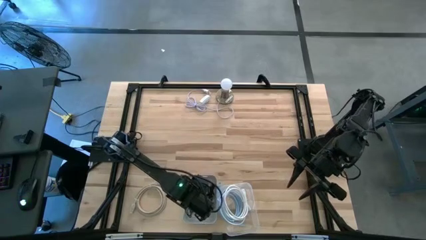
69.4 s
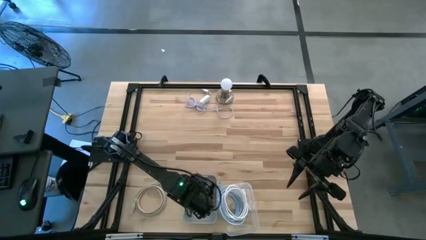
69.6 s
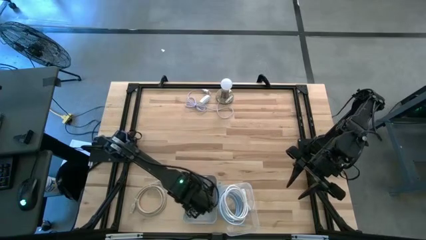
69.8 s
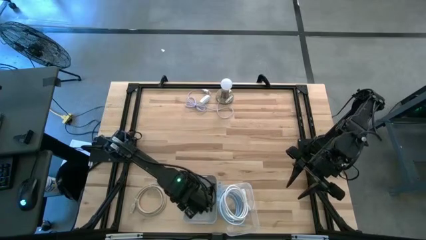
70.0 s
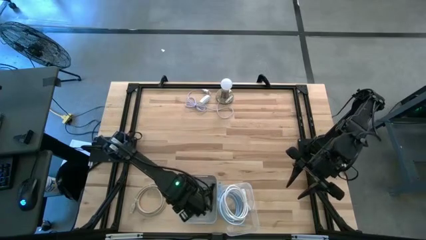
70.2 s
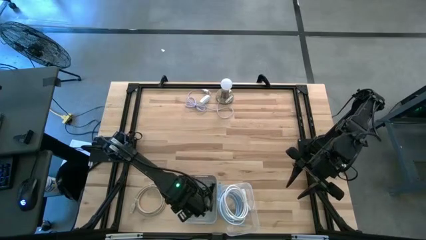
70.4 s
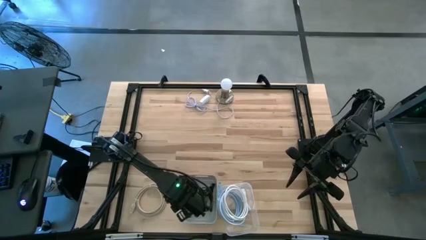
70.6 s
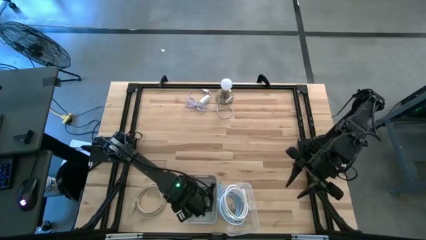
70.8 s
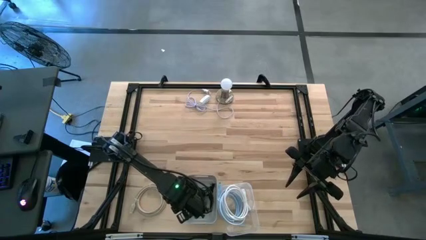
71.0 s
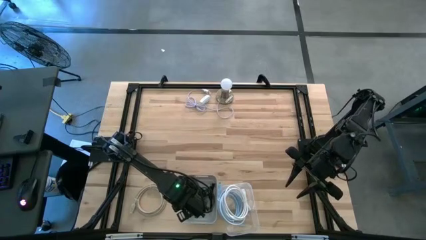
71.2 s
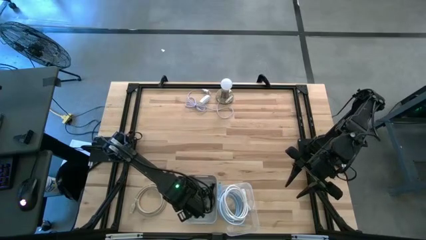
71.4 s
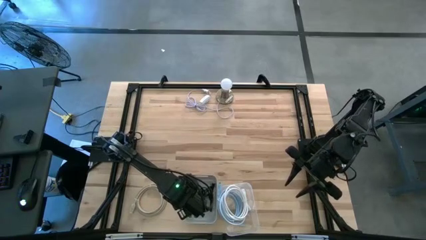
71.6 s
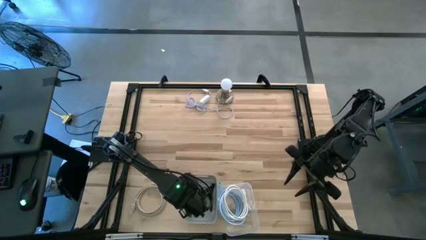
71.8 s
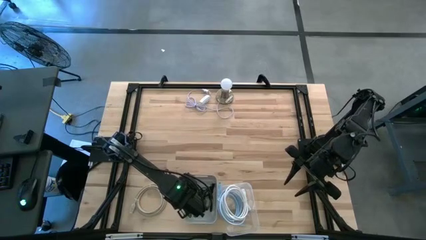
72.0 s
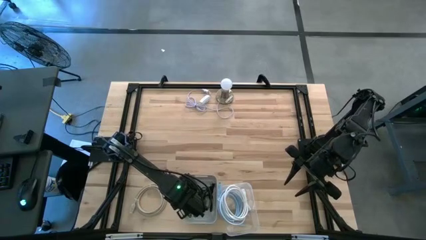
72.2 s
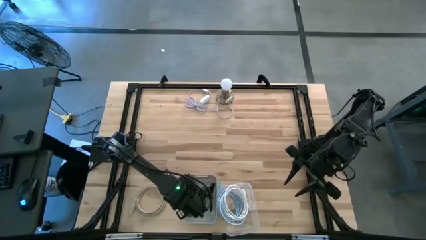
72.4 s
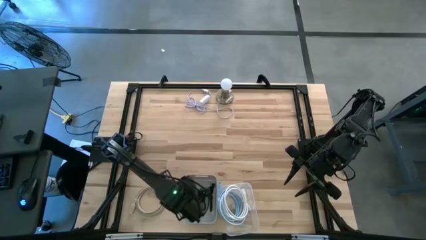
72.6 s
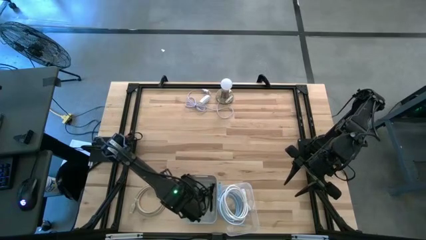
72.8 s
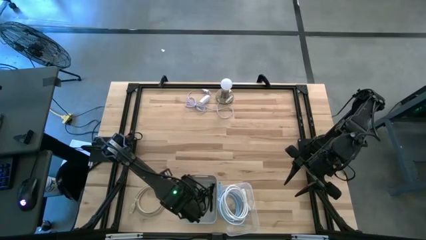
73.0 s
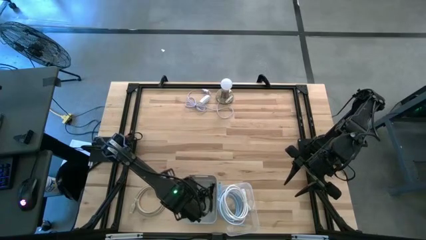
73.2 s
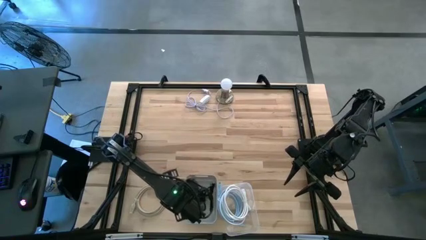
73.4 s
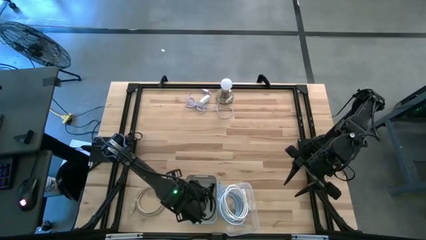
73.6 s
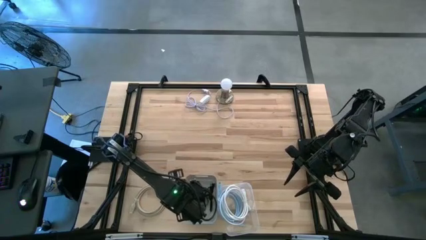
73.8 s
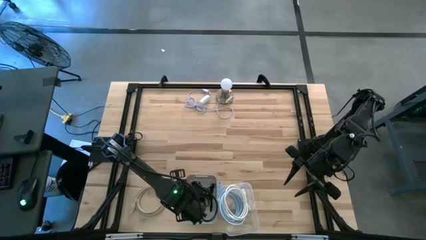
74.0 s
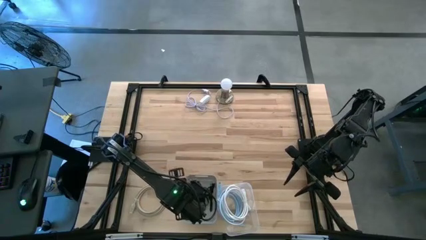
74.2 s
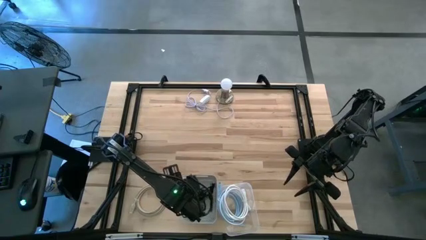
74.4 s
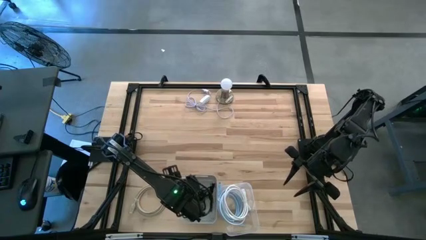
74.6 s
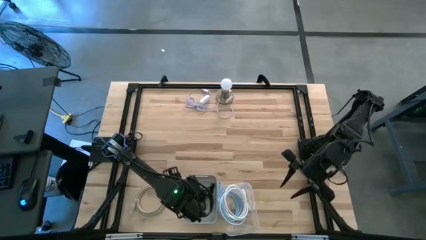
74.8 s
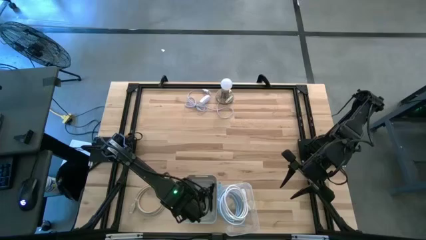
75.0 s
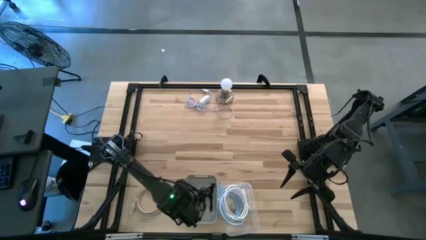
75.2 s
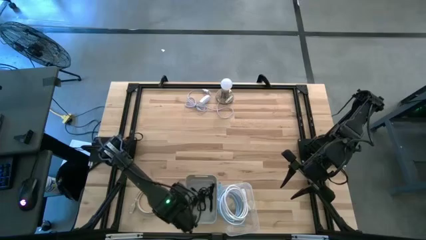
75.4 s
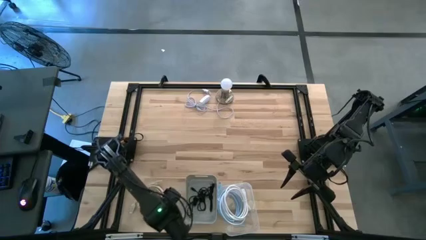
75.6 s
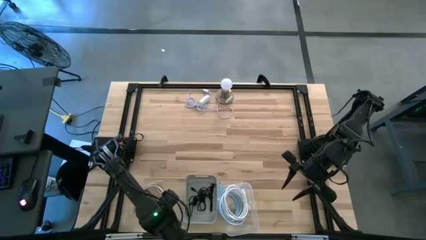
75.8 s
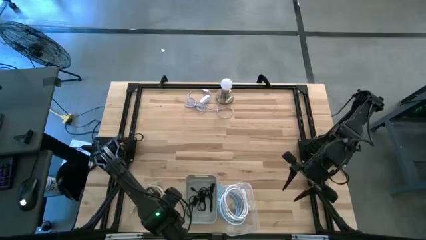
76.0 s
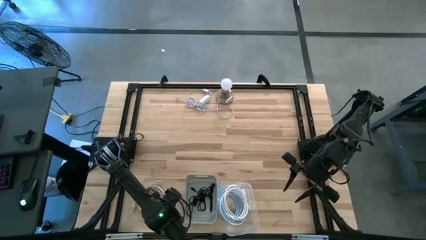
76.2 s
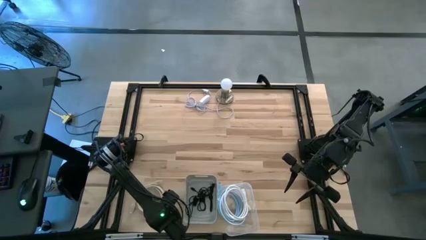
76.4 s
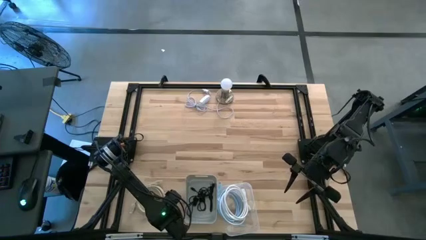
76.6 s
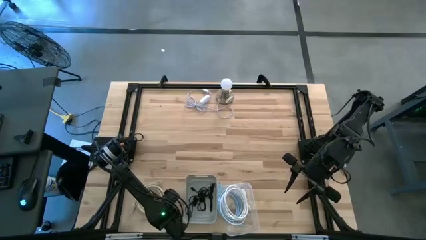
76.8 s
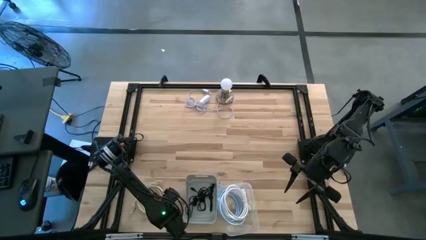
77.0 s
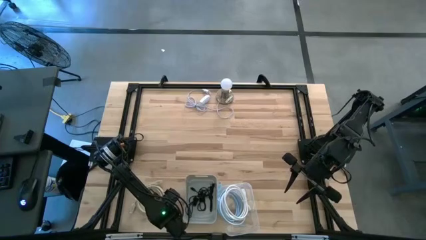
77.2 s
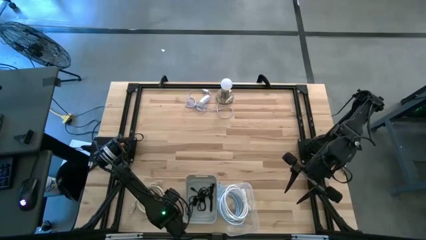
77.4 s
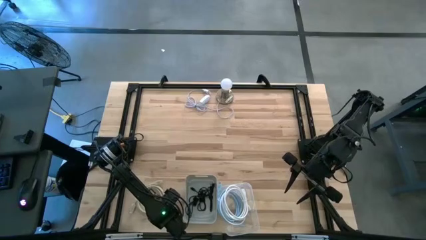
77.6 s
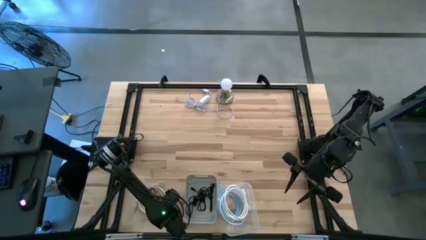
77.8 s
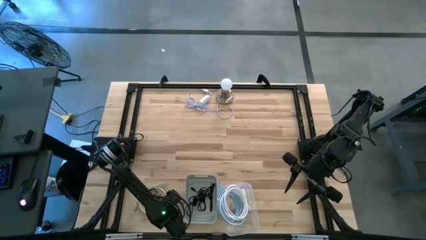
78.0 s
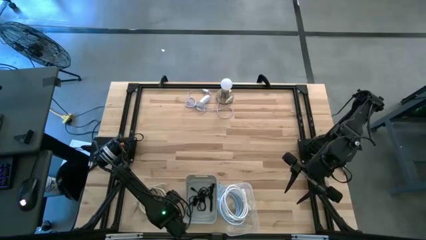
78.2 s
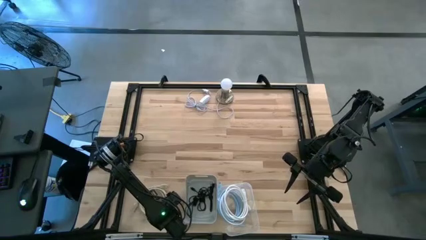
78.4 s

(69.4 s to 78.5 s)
Task: Pick & Place USB Port
Put the gray HDMI cable into the transparent bin

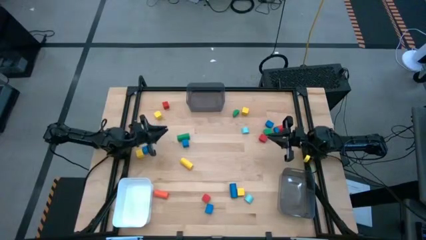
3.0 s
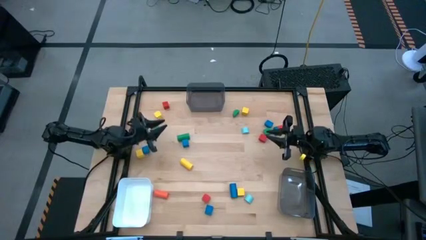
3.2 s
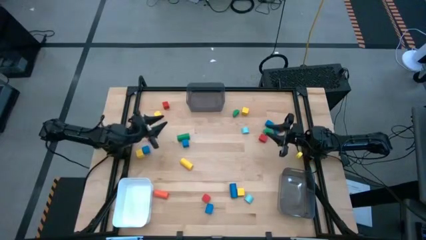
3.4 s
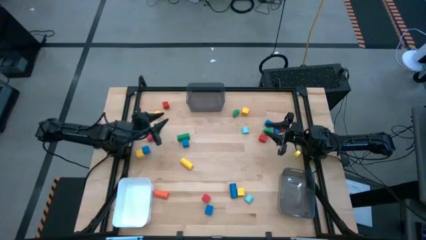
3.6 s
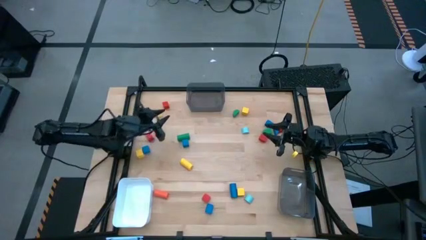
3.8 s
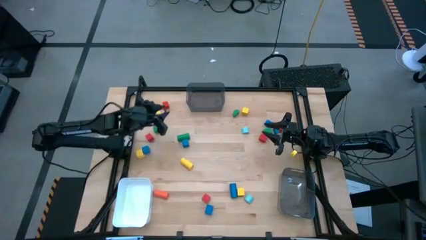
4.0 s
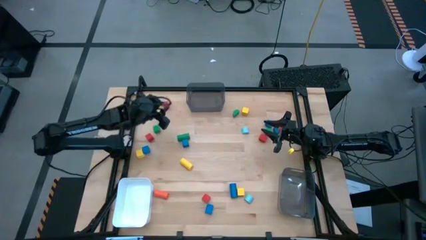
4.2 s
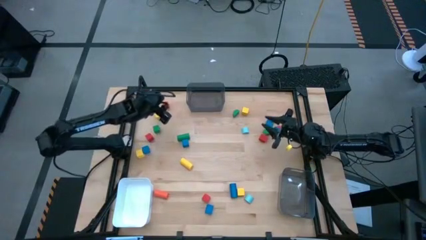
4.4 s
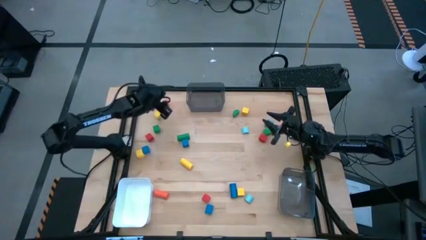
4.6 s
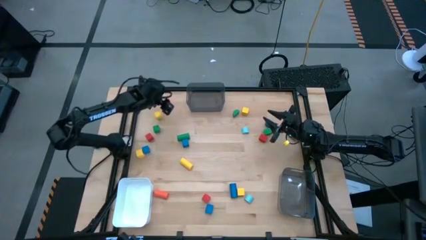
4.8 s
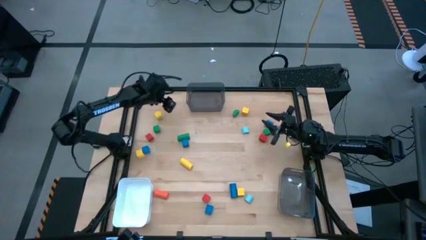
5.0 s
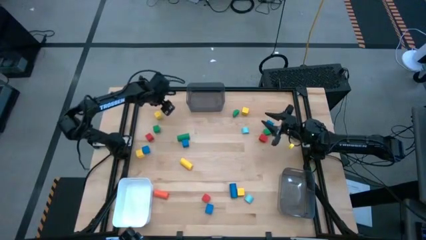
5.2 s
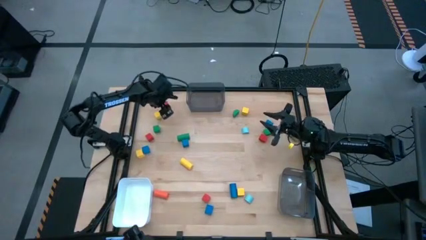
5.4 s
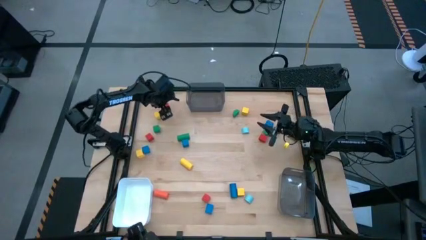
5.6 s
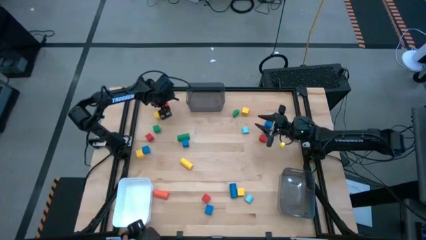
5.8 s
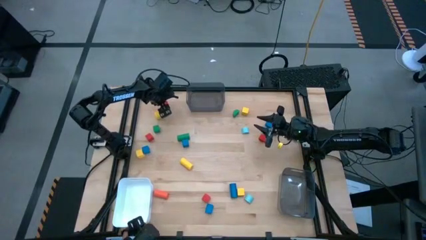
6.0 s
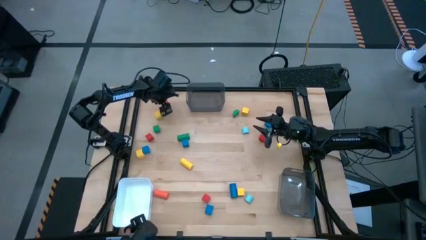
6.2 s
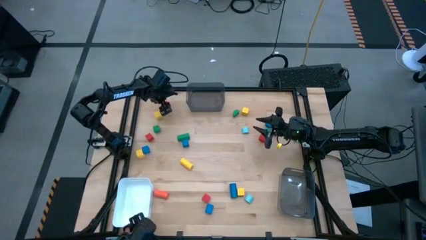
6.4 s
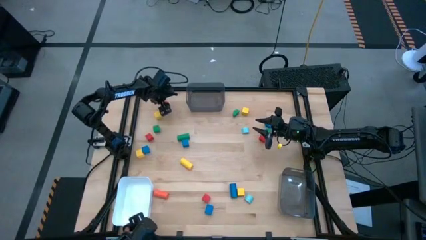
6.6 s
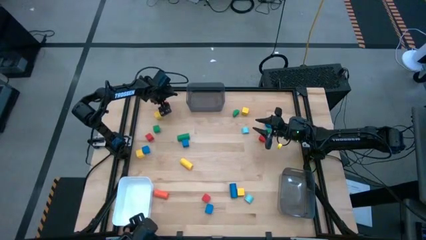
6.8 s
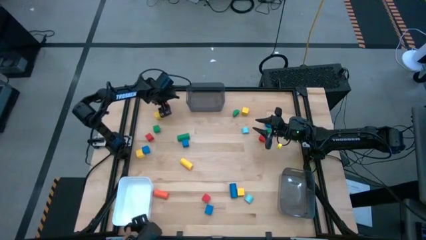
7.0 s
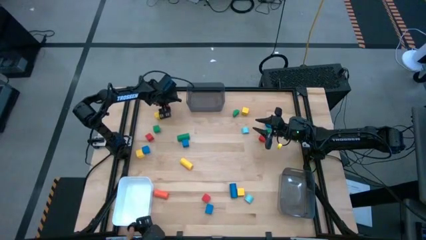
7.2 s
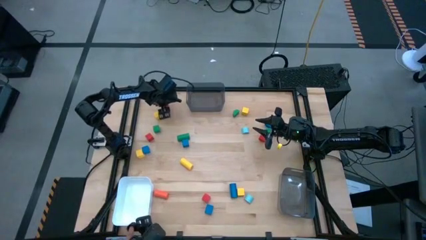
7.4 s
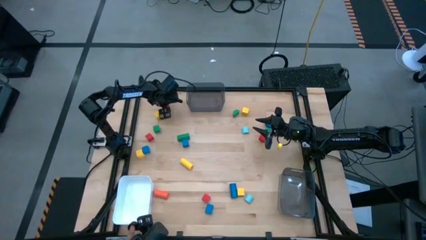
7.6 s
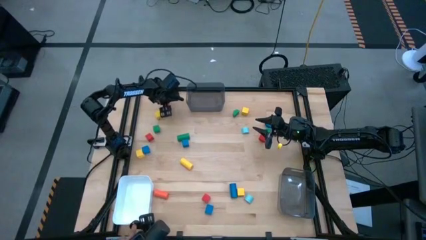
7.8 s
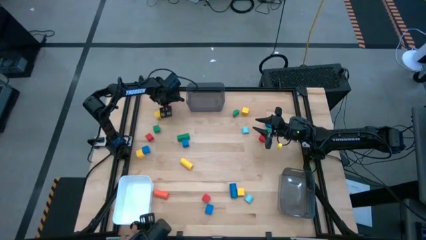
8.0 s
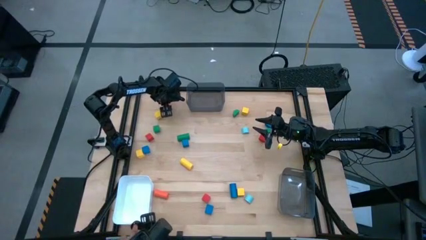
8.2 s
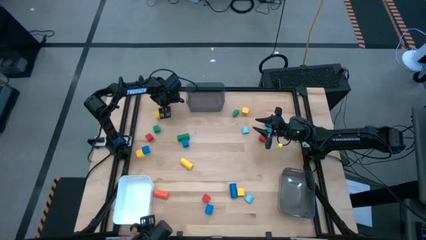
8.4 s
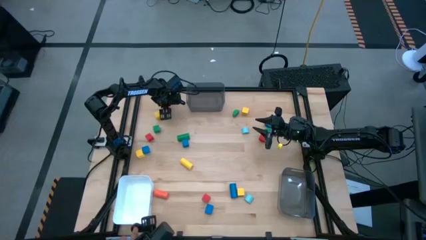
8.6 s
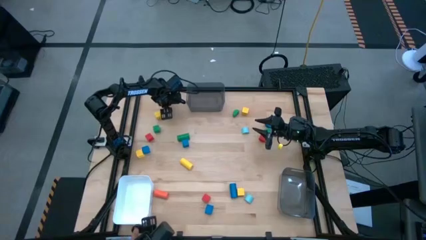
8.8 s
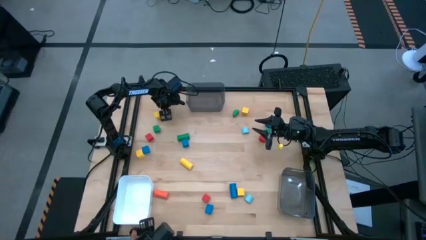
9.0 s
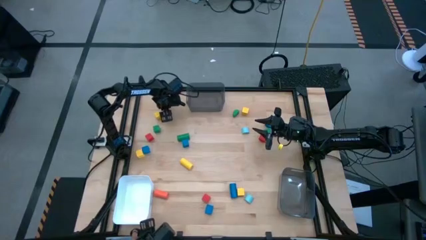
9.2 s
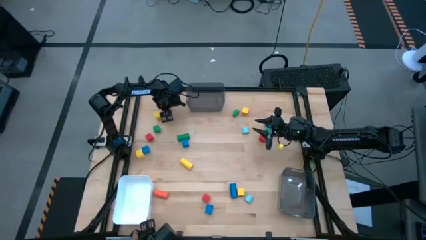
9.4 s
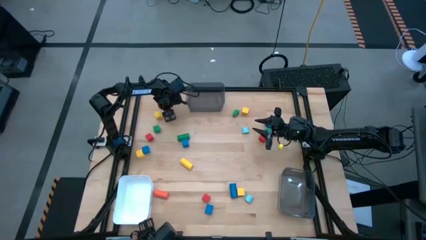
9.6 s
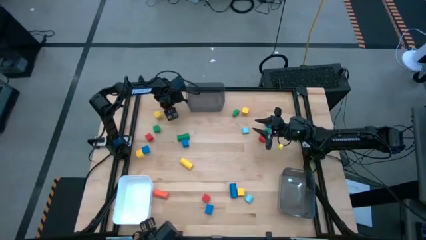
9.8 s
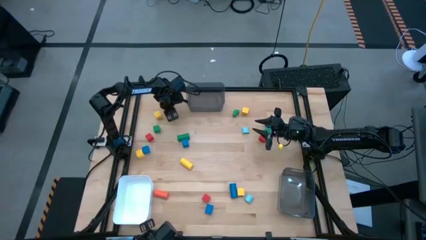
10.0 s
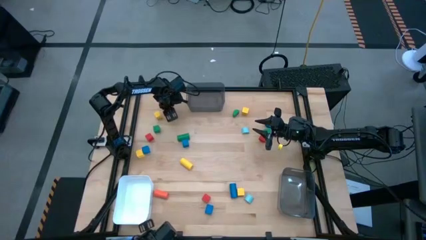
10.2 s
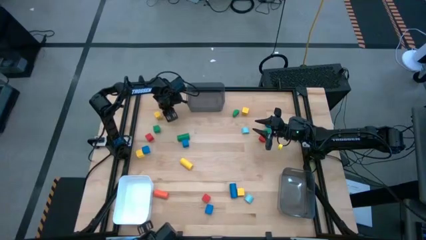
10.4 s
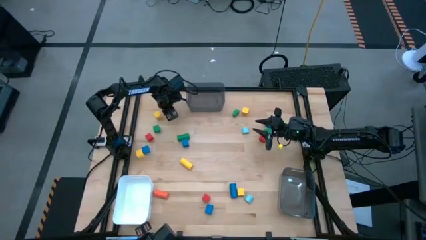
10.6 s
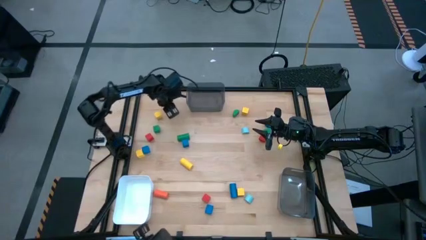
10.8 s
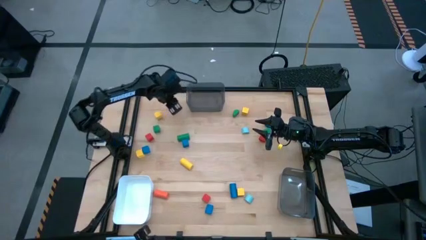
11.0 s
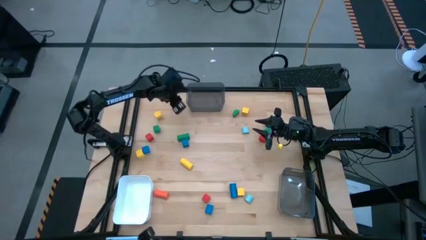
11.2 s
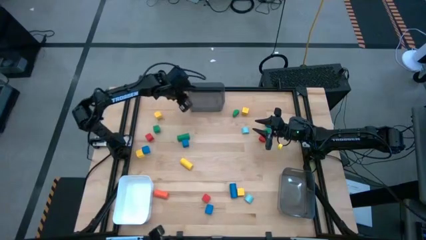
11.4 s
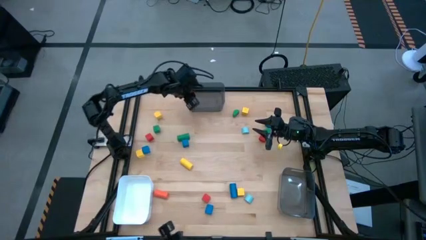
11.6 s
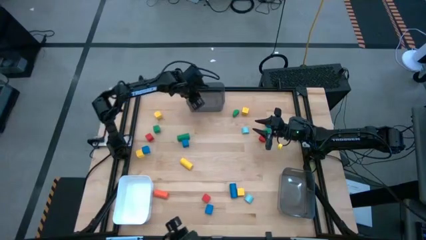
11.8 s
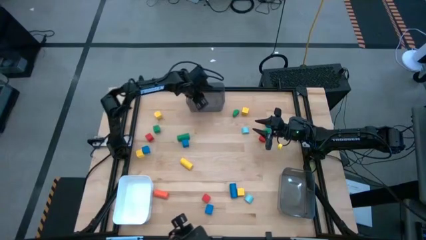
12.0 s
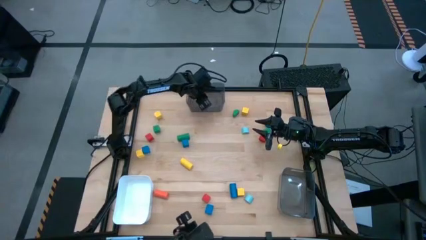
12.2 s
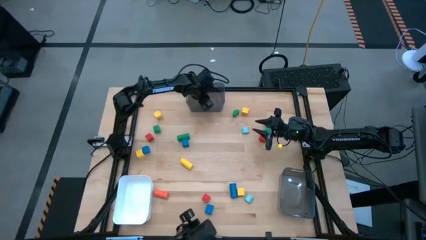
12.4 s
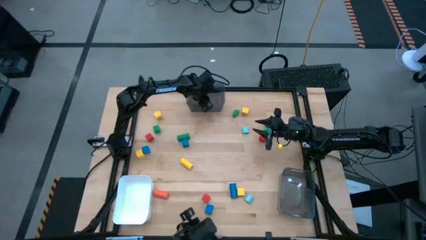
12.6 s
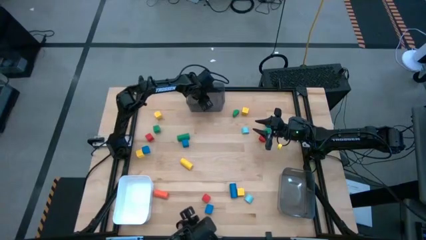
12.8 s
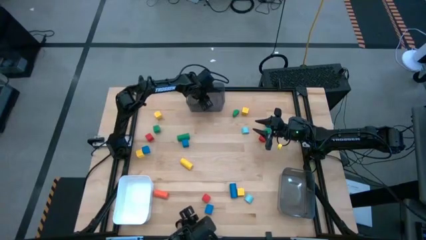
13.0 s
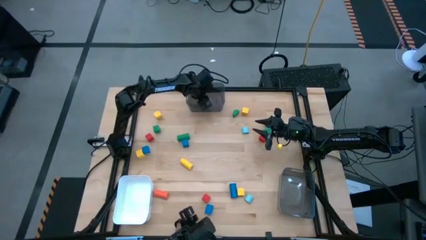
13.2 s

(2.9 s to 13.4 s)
Task: Sort blocks by size
Put the red square block into the top black bin
